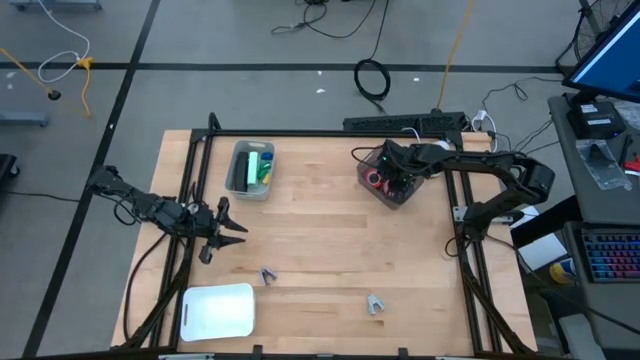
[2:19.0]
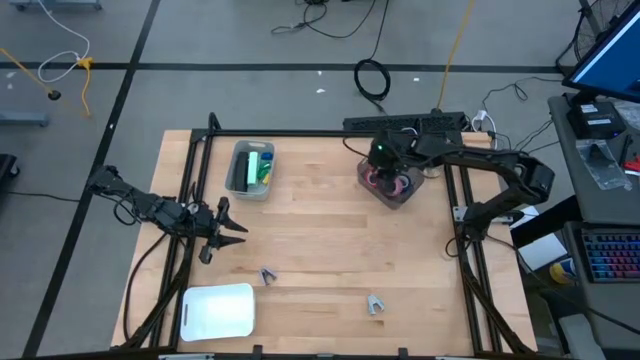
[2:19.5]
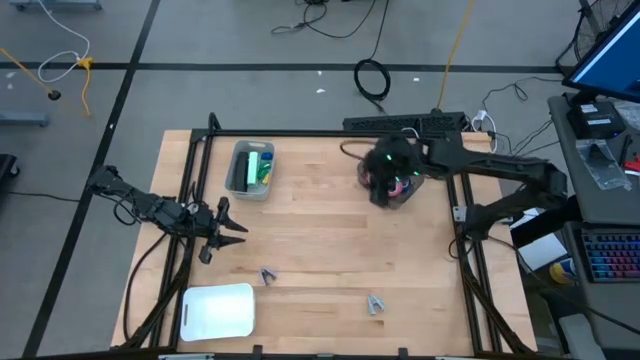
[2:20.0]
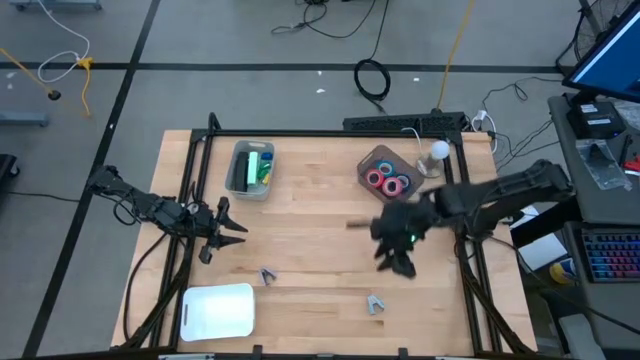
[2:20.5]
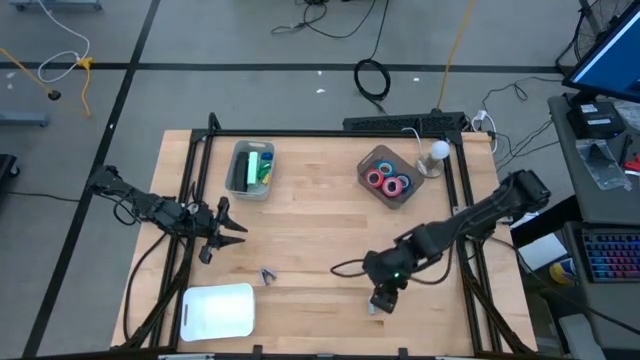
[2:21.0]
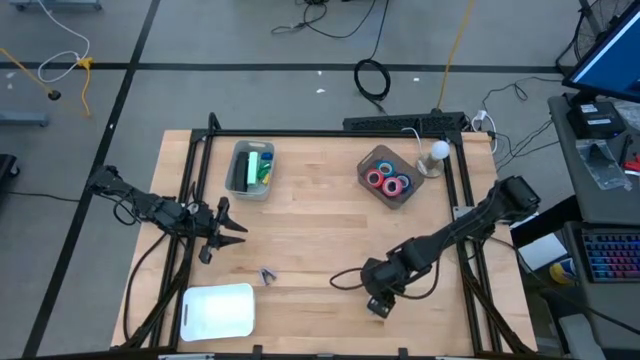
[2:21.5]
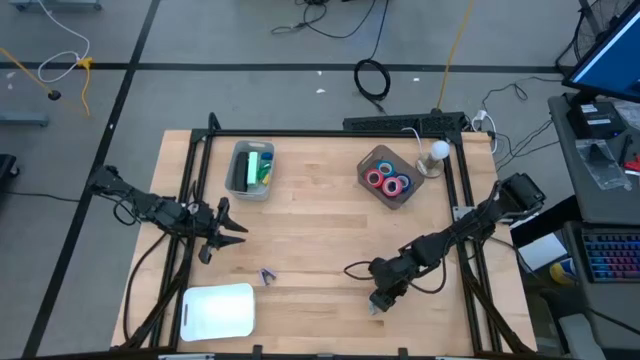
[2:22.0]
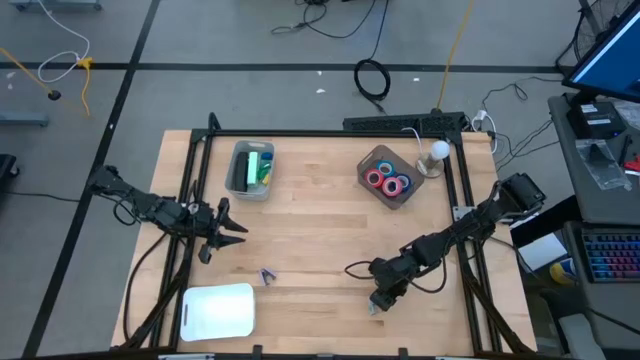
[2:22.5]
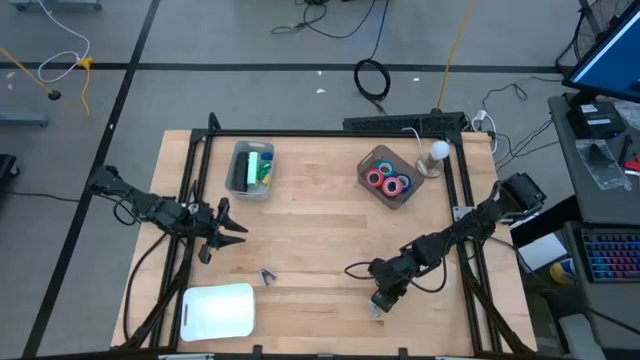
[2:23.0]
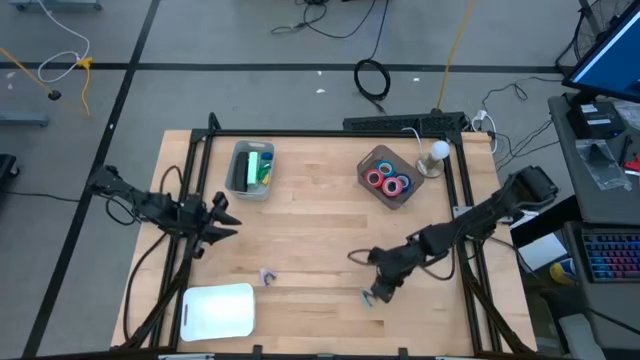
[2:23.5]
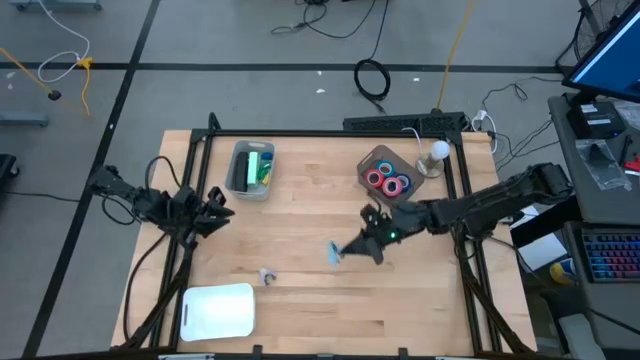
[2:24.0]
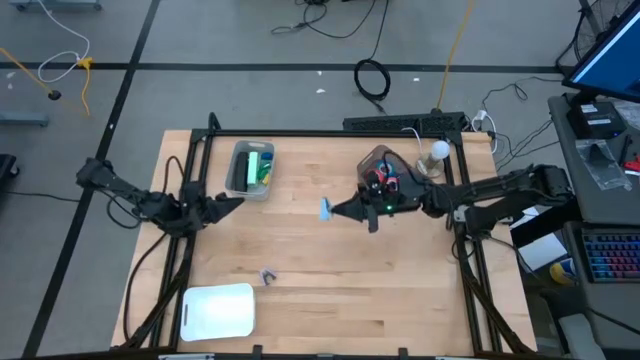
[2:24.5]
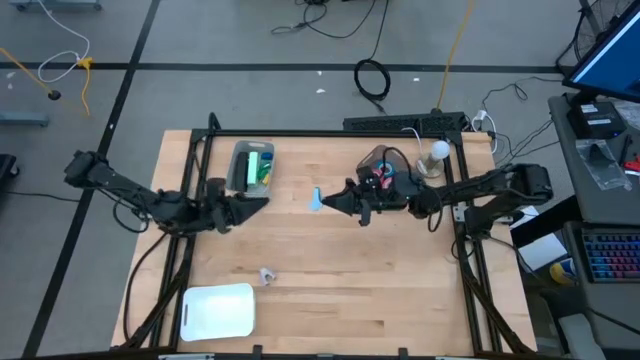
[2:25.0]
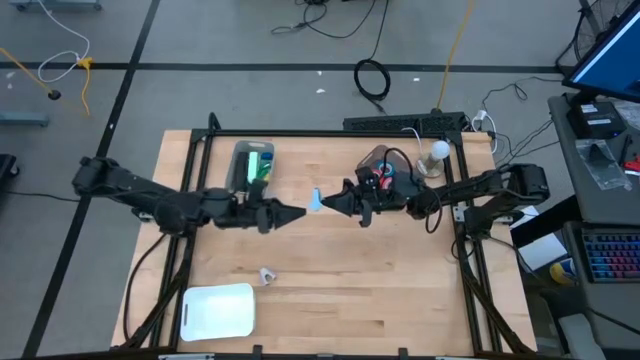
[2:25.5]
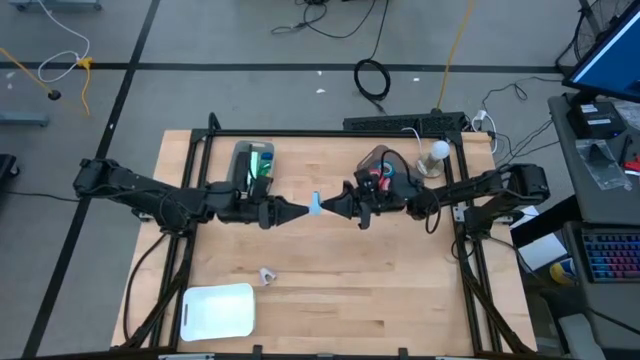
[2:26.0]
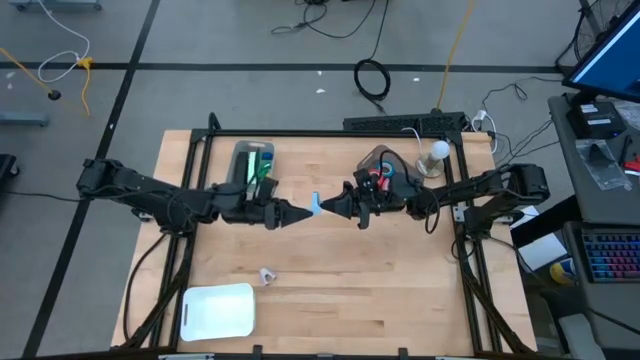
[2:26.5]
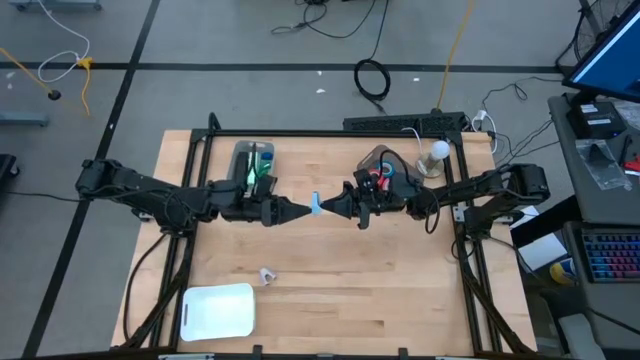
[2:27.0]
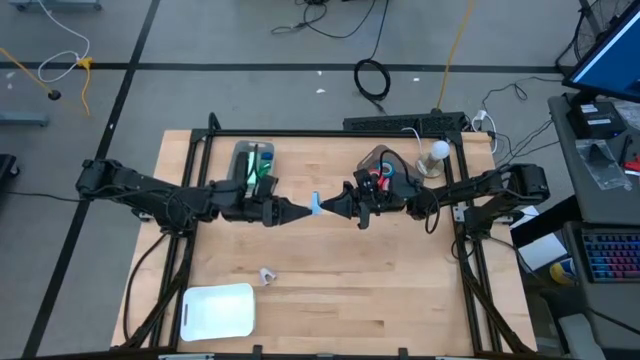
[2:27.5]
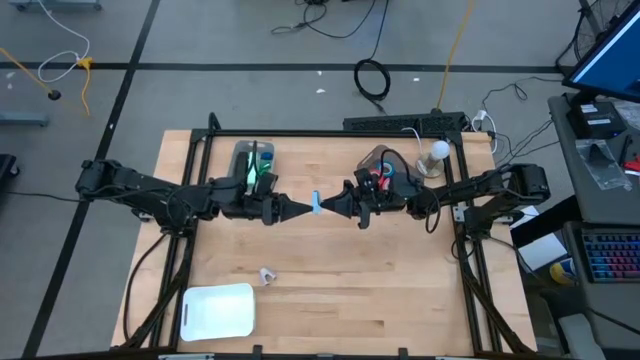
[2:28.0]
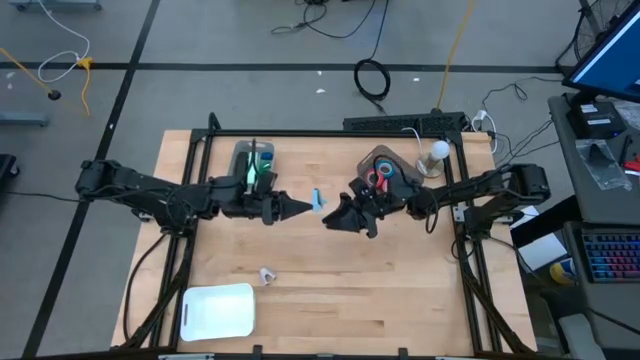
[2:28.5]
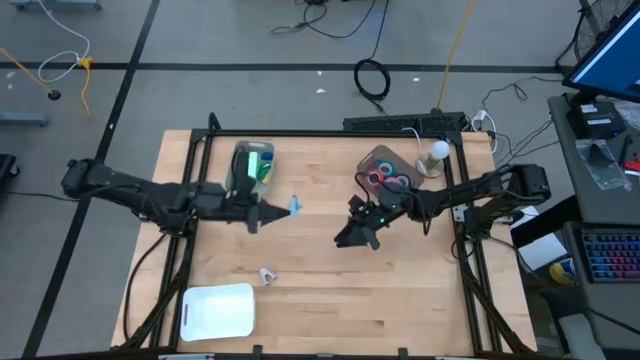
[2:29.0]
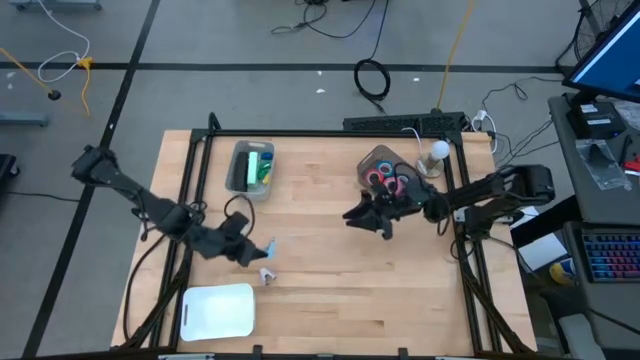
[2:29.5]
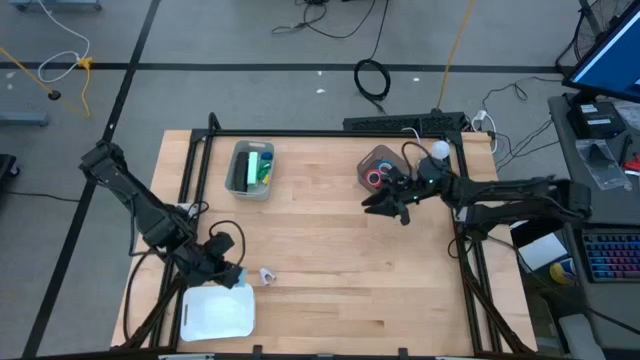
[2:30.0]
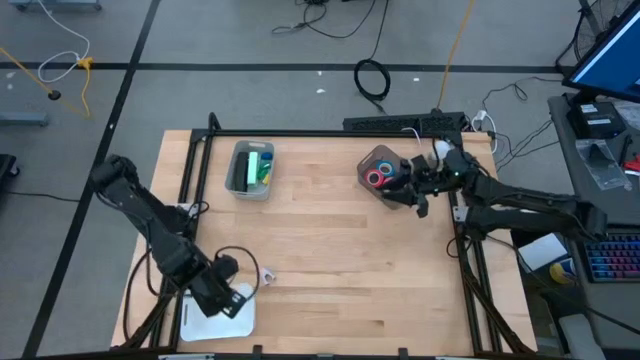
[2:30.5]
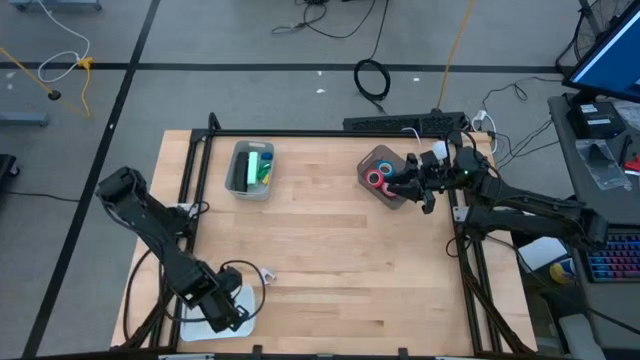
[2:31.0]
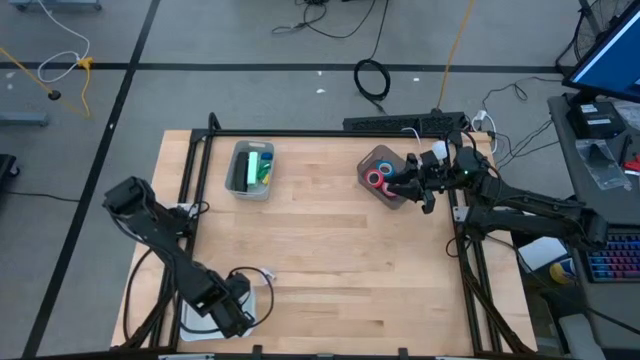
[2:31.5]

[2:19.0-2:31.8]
Task: Pick and place Stapler, Stapler remover, tape
Put the light blue staple remover into the white bin

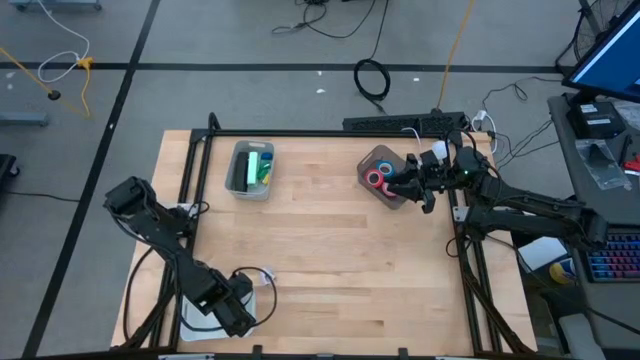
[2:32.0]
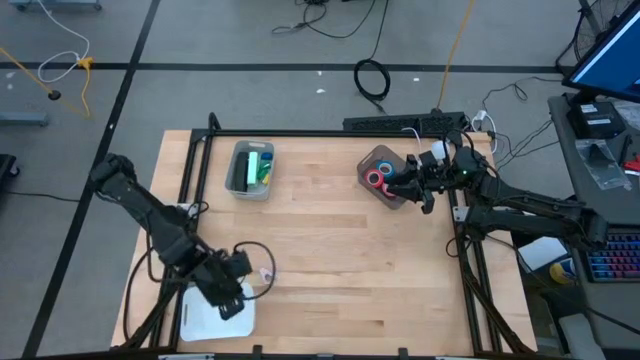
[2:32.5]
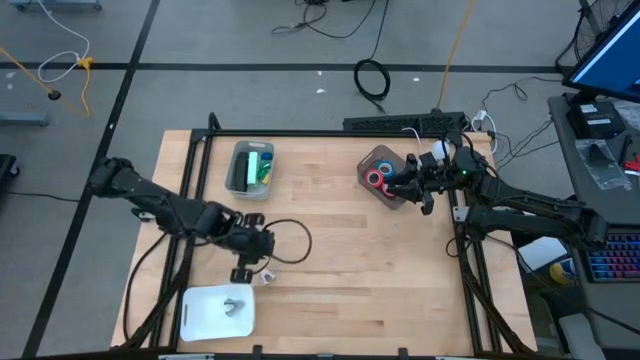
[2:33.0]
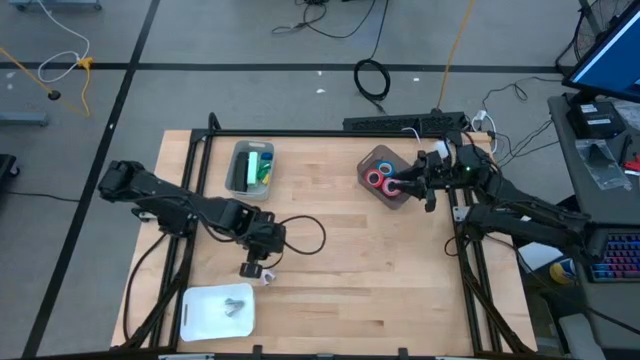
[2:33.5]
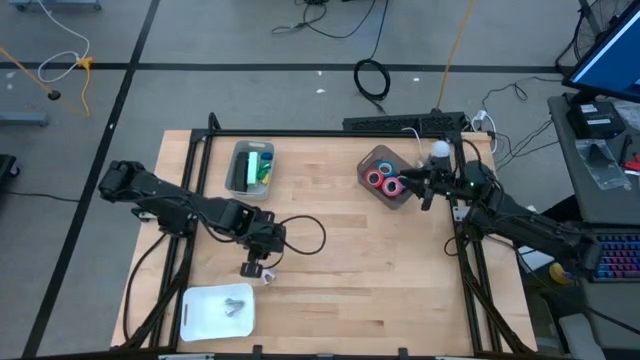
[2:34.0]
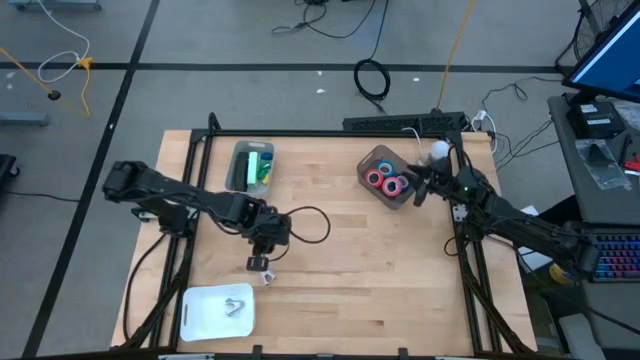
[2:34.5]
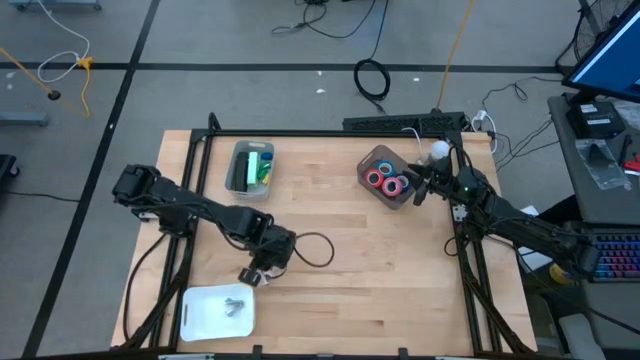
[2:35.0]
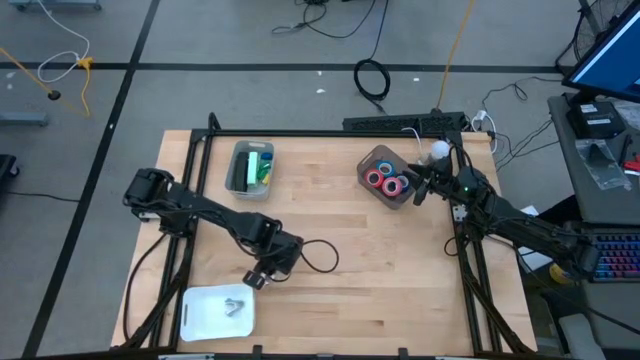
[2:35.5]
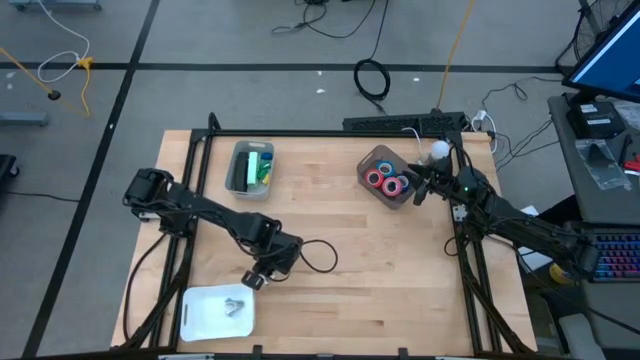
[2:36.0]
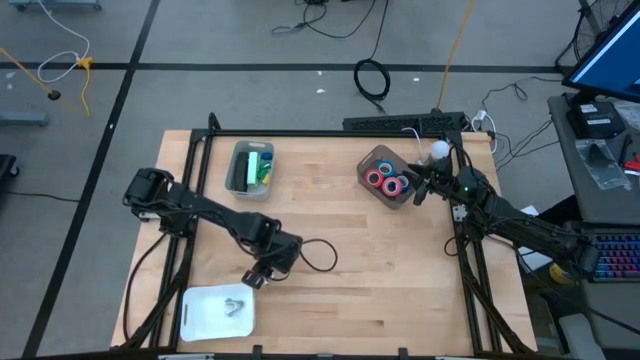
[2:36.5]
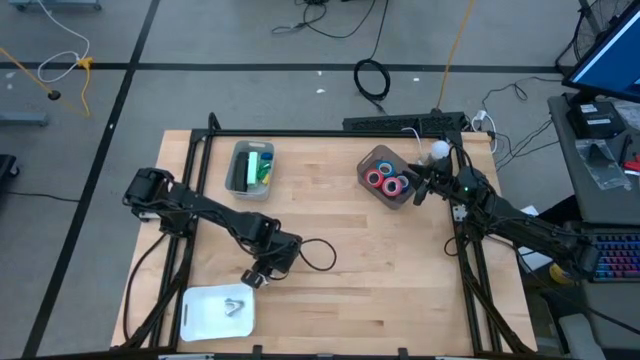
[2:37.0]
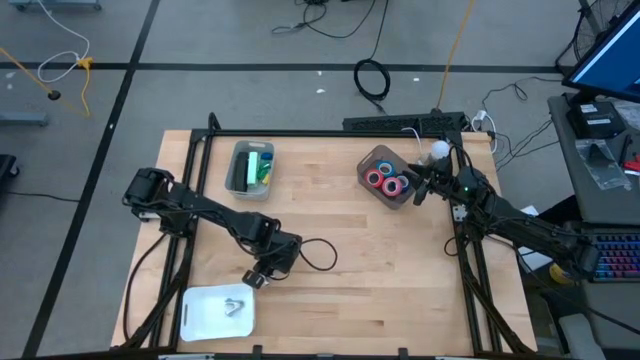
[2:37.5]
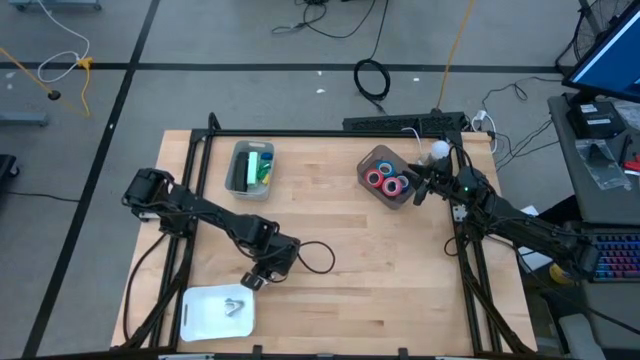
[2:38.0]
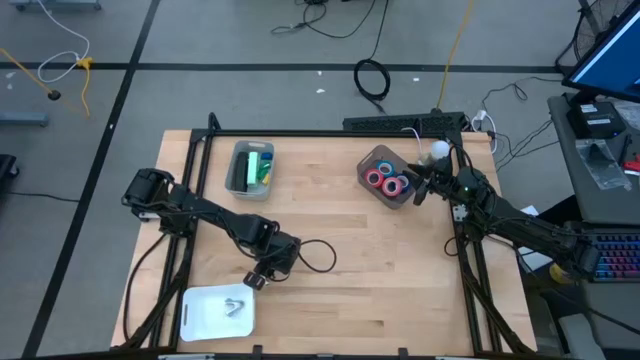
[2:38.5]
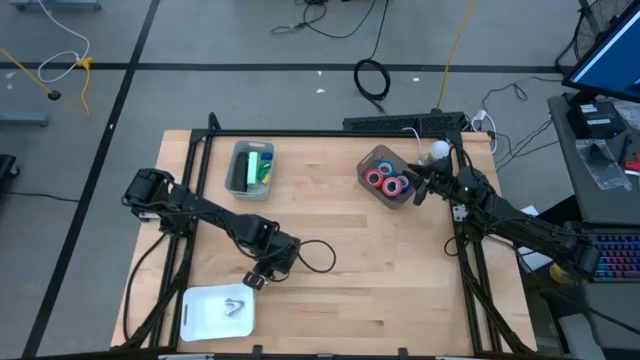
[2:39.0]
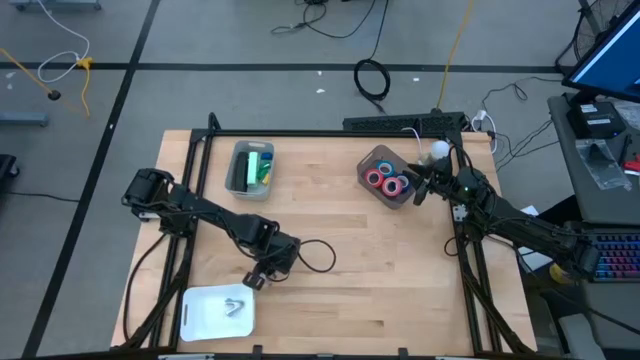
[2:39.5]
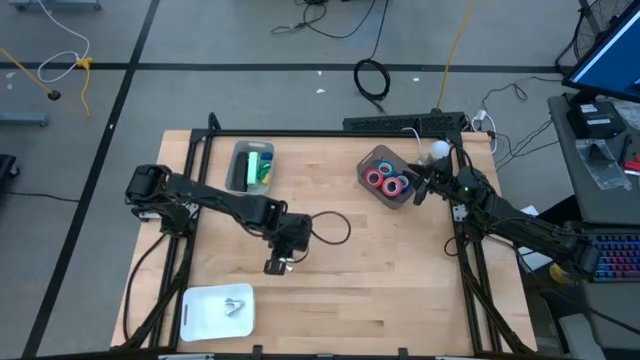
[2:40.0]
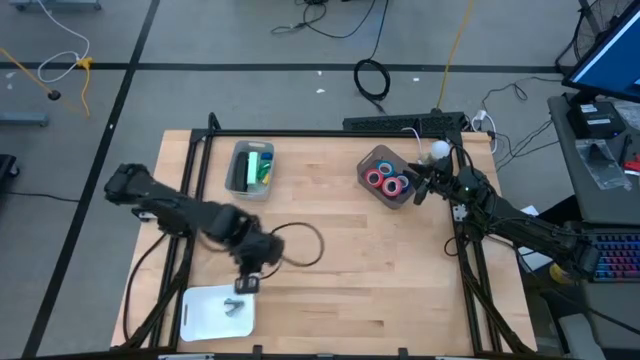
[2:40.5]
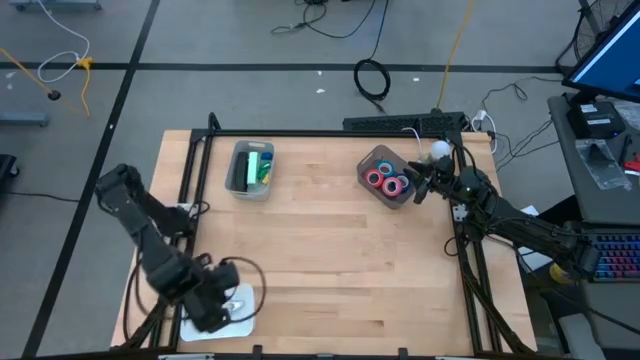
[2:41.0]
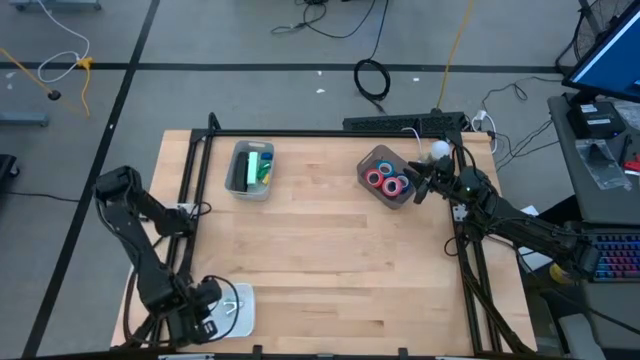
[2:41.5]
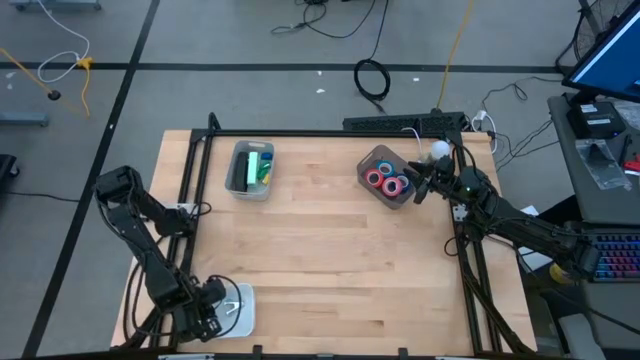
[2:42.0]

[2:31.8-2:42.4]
Put the purple staple remover into the white bin
